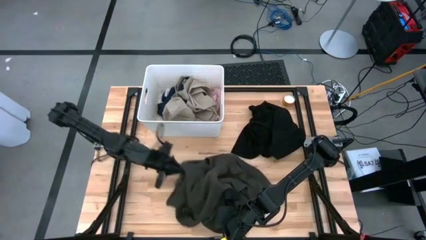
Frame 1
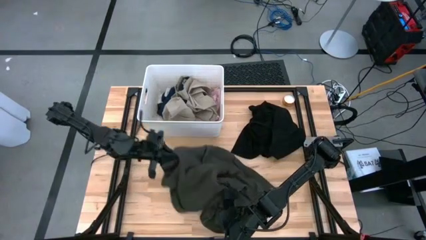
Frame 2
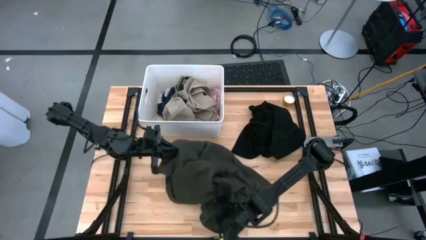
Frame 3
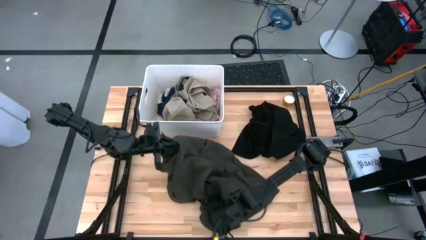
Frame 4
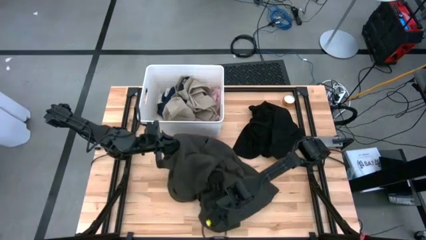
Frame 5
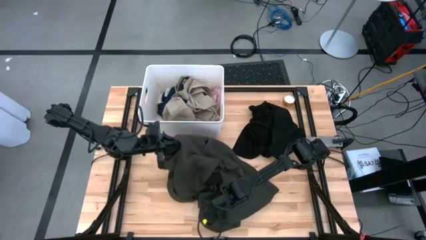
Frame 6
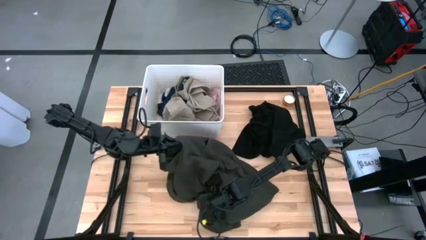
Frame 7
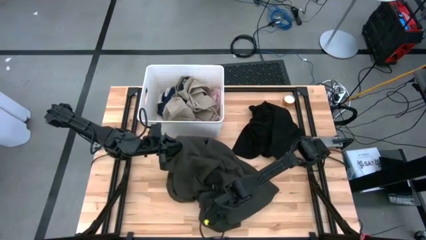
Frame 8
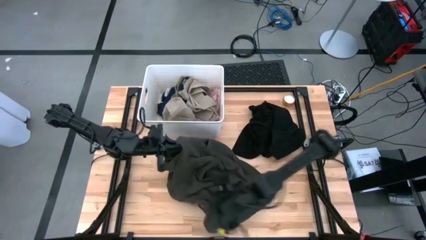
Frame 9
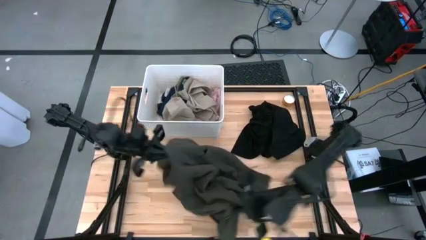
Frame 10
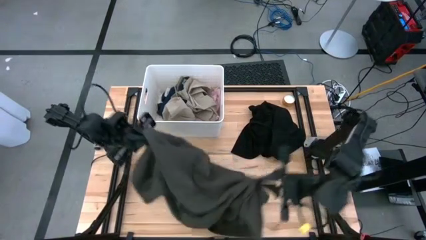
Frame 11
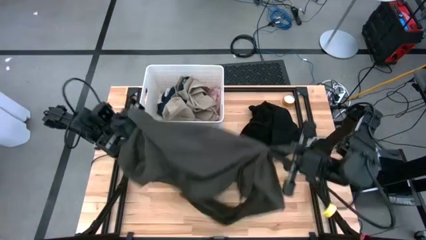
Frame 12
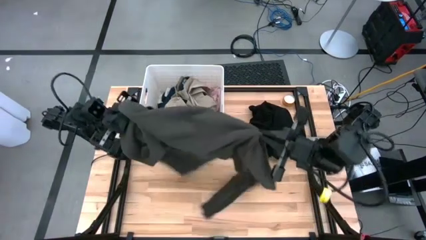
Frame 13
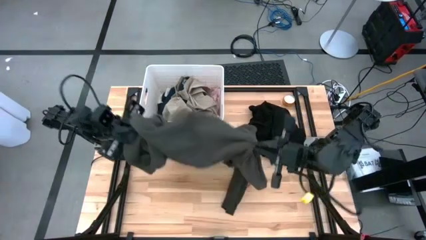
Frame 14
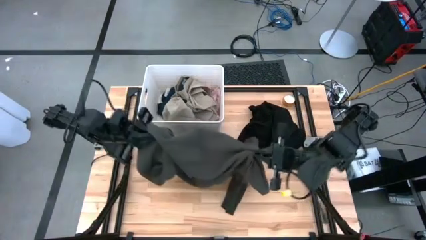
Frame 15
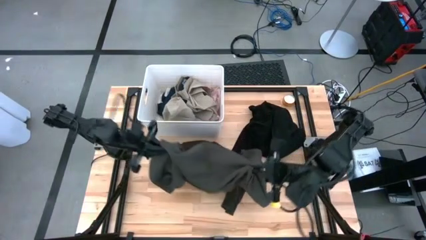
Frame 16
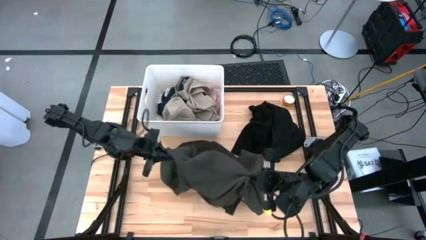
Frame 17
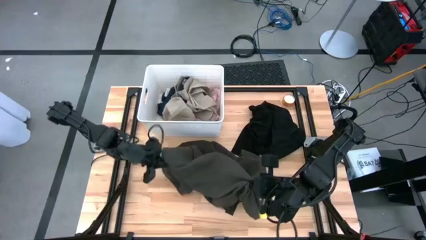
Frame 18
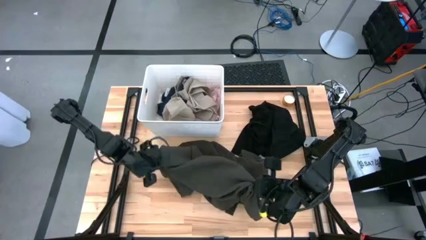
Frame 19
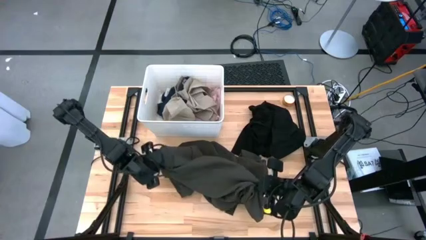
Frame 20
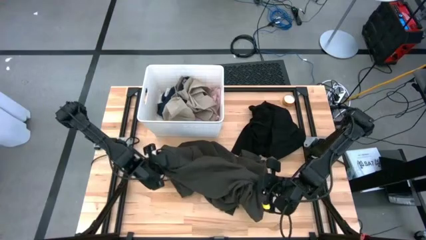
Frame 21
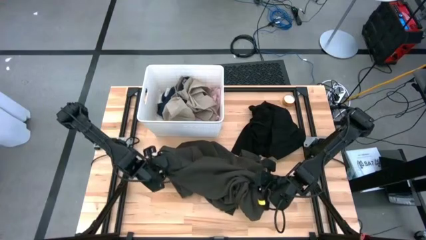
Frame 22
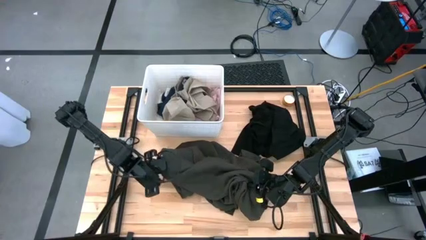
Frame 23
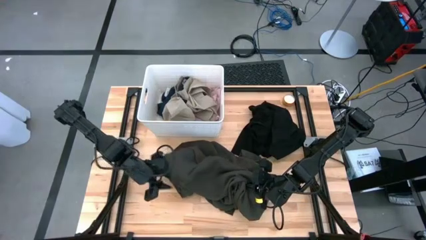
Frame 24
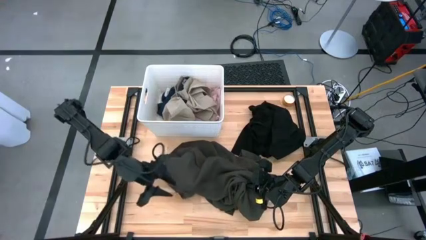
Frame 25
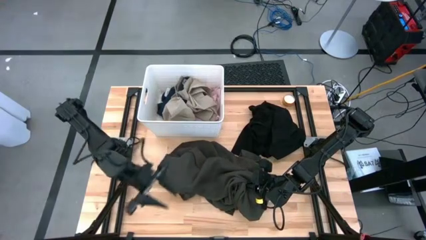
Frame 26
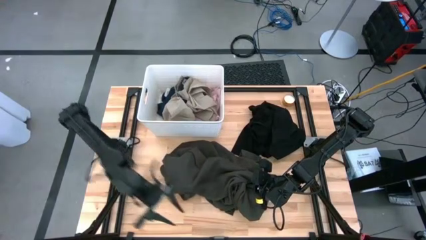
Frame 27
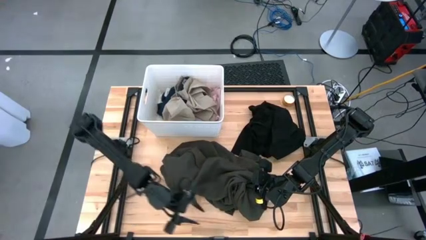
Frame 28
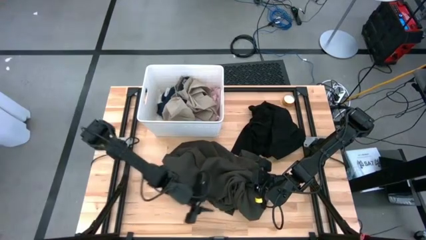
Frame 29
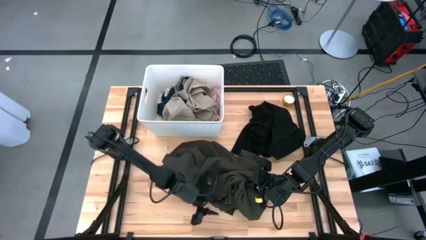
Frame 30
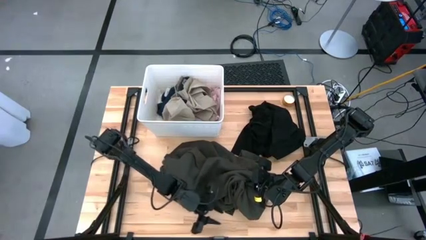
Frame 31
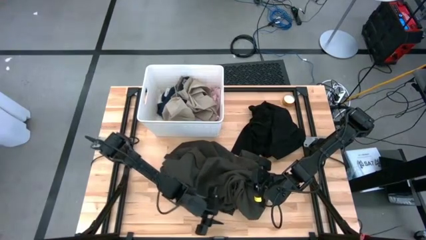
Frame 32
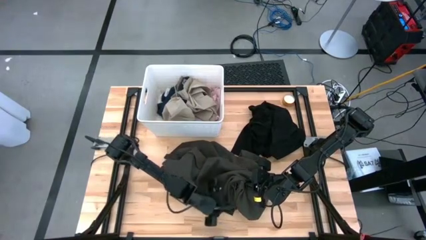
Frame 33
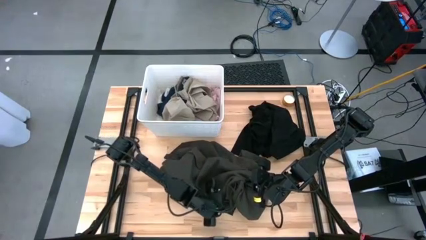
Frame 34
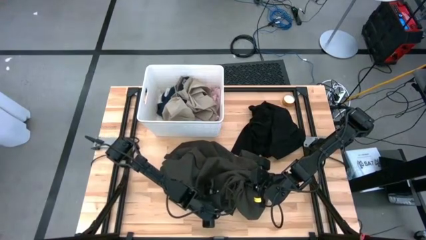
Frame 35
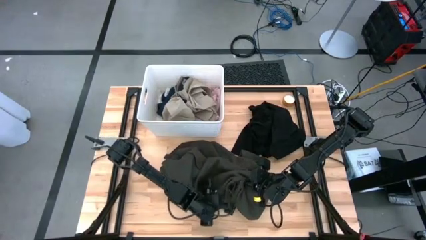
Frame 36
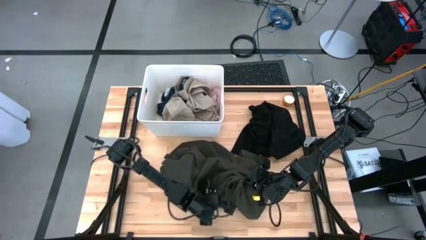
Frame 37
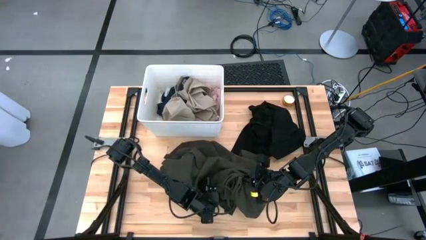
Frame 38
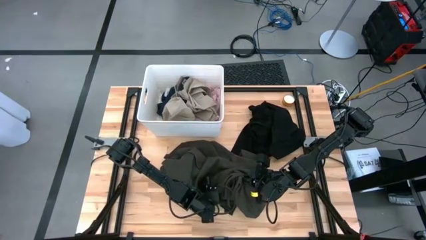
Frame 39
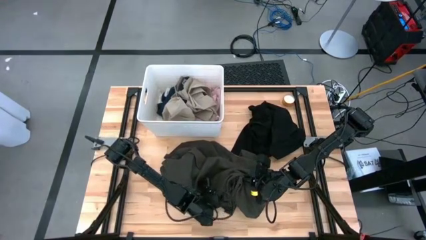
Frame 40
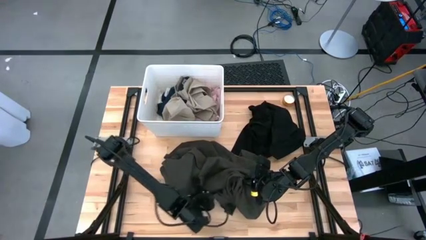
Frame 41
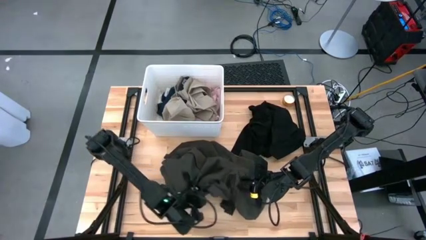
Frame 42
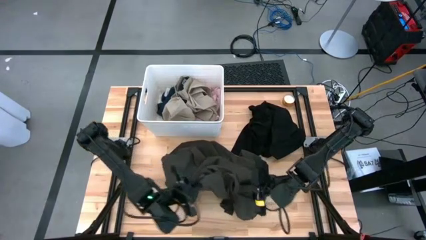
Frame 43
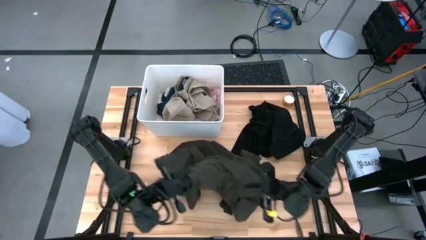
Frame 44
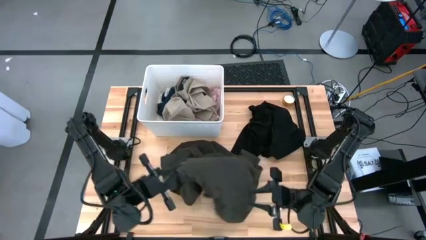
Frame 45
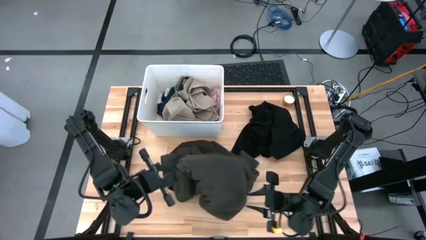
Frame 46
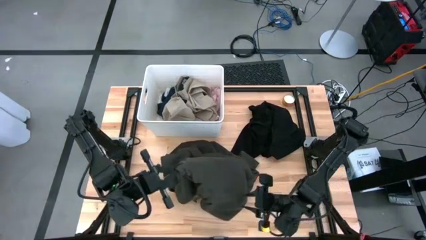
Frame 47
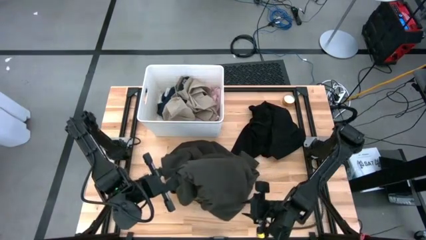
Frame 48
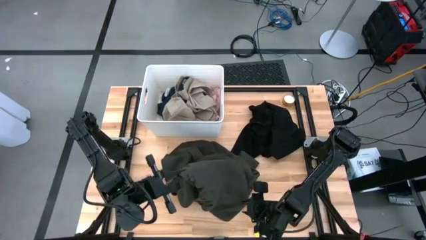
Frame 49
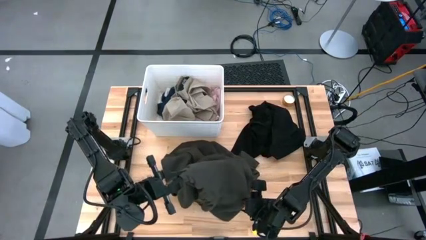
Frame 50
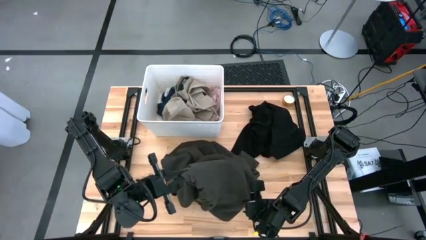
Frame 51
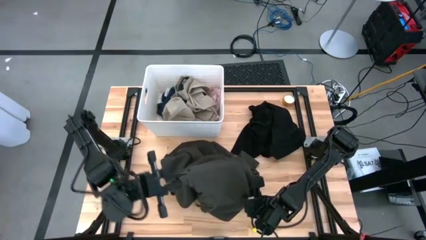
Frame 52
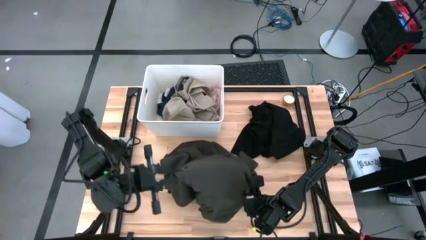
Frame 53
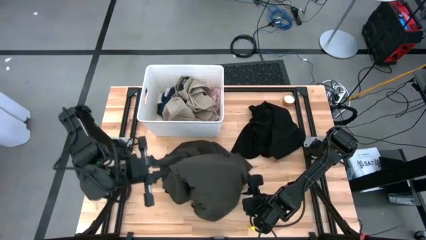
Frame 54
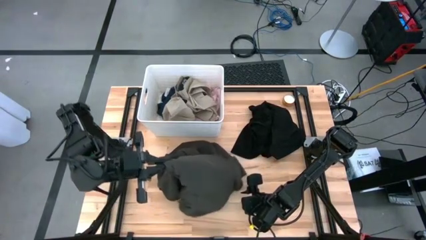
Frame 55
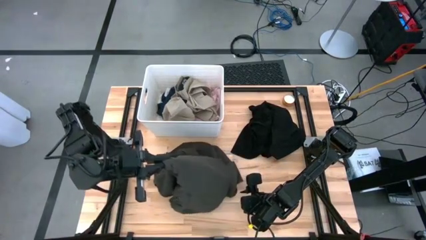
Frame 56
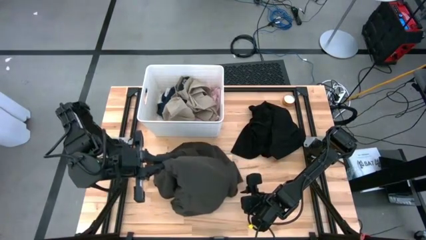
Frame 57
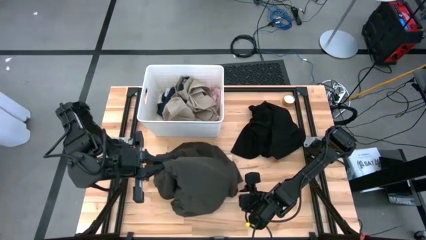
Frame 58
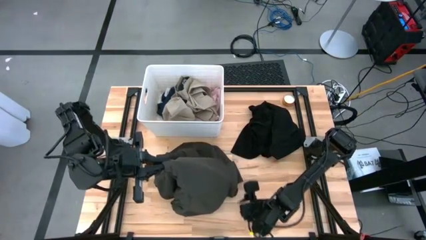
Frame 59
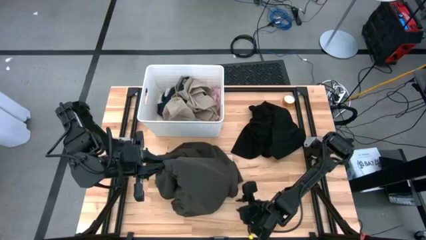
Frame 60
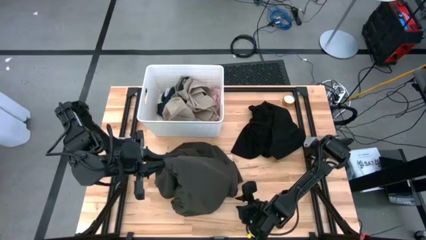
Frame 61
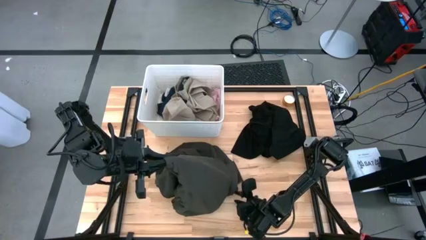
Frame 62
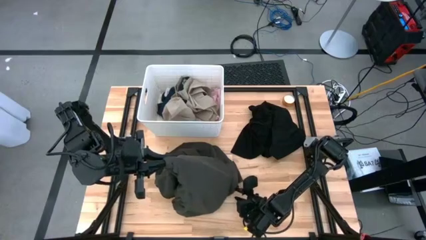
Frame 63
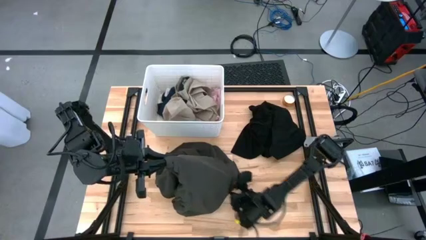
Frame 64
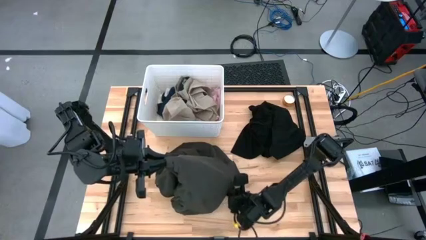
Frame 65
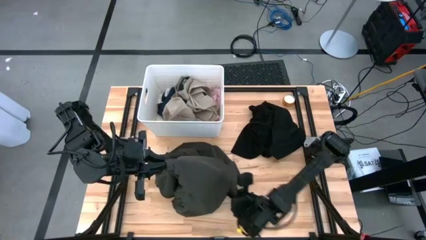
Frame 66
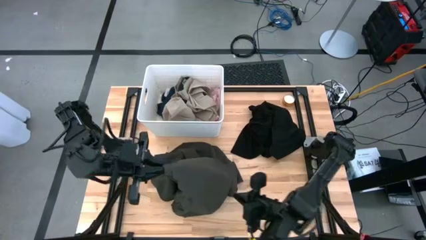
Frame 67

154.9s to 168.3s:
Task: Sort clothes
Put the black hoodie into the white laundry bin

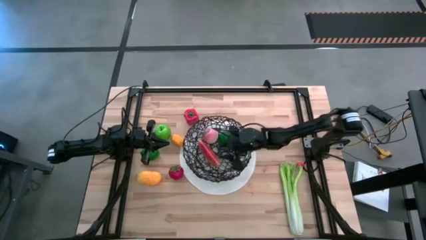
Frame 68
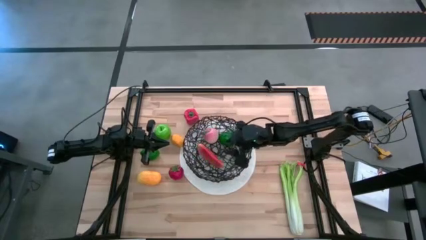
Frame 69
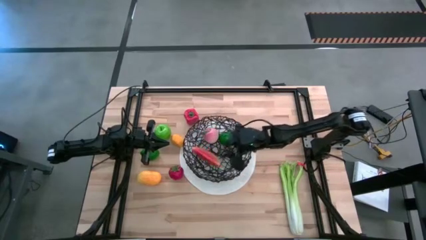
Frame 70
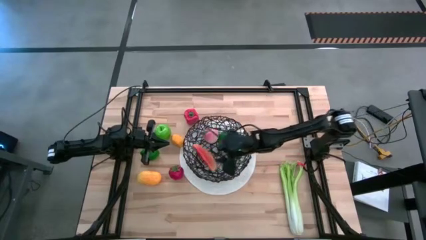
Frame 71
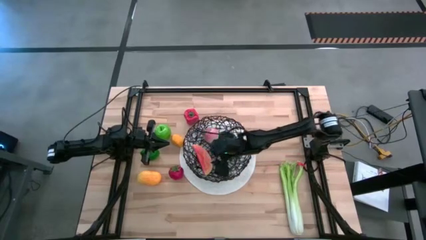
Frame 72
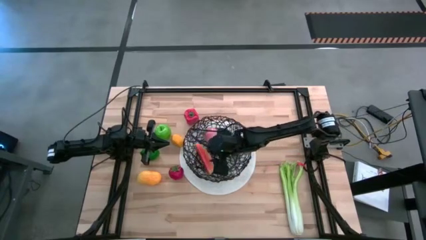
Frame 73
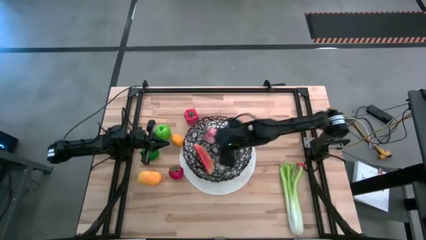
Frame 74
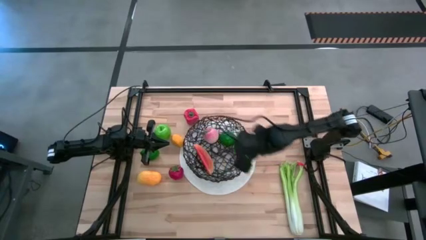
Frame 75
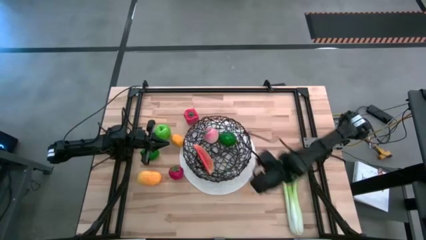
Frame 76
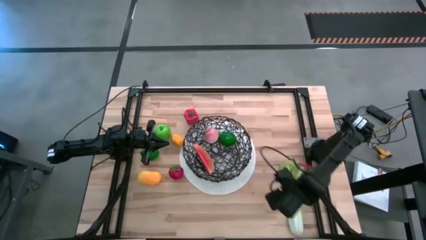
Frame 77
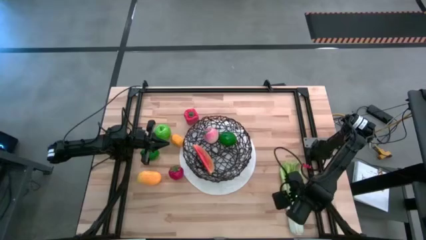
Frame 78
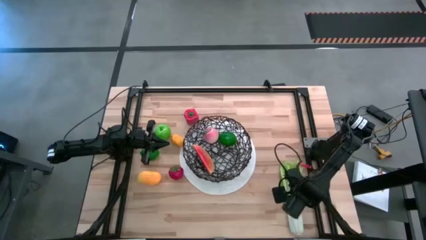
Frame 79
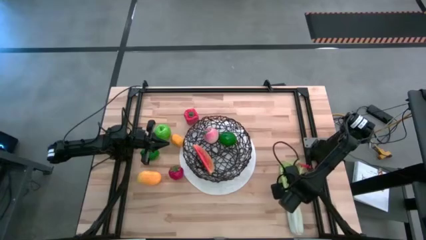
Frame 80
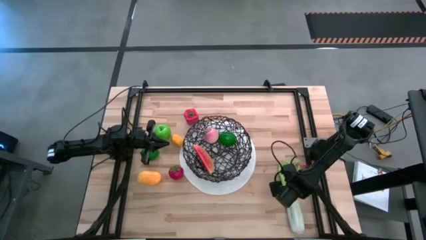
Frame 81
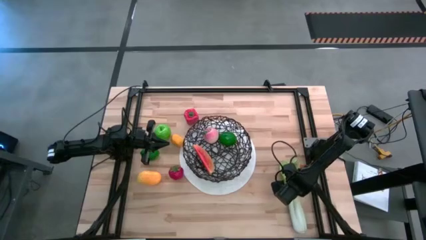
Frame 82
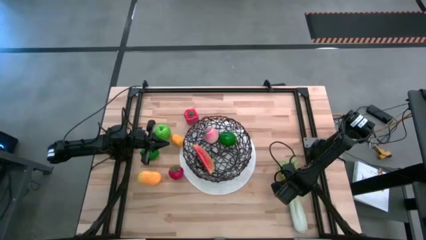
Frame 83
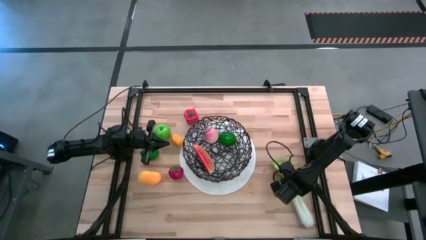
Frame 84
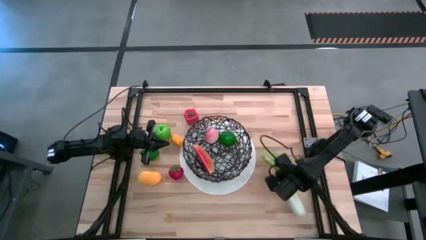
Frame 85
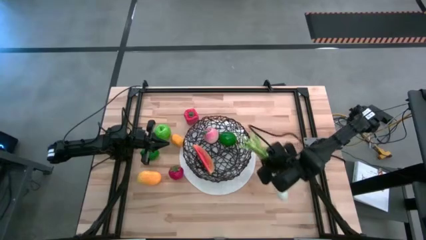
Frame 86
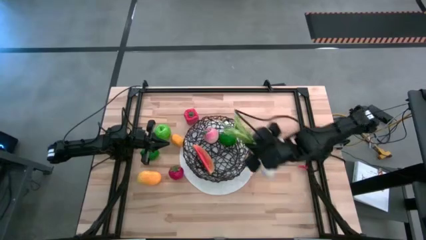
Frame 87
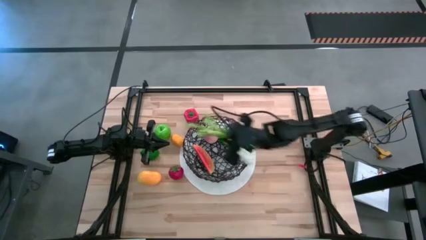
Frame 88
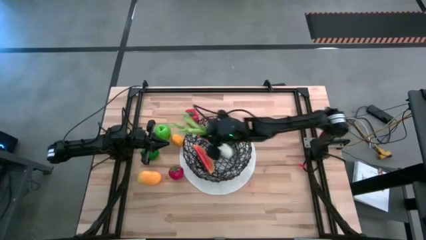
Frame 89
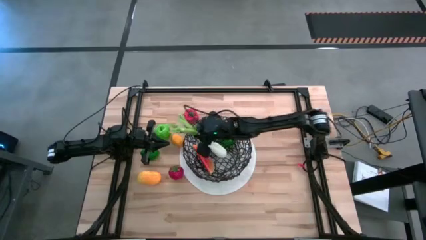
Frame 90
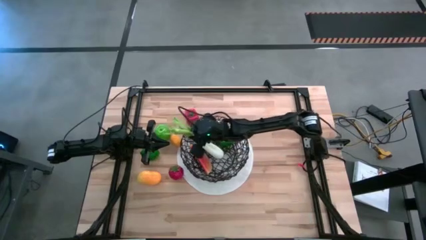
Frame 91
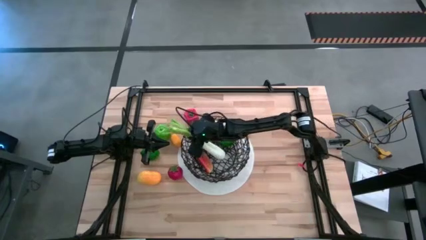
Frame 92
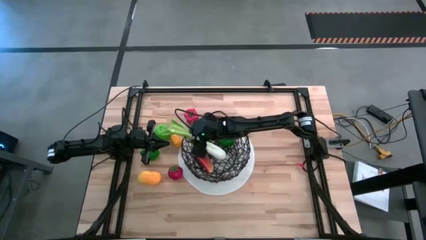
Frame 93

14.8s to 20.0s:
Task: Build produce basket
Put the celery into the wire basket
